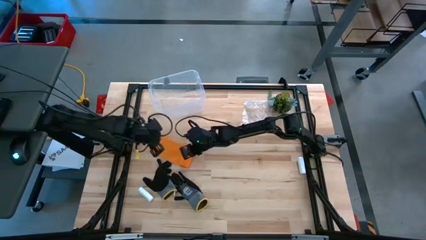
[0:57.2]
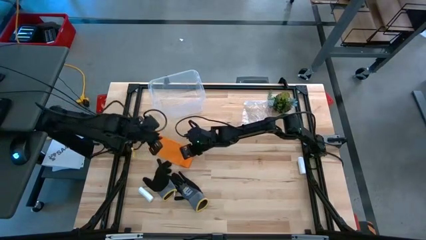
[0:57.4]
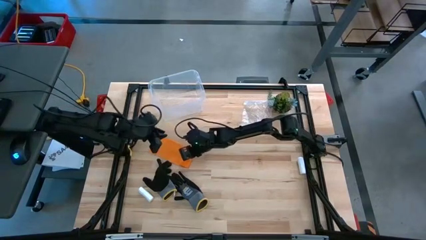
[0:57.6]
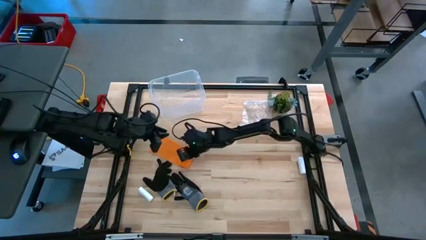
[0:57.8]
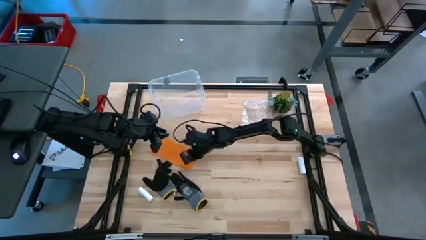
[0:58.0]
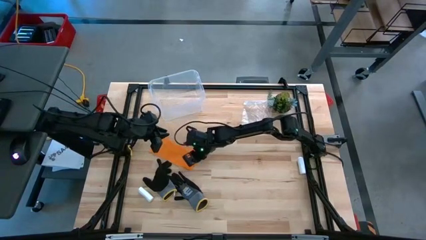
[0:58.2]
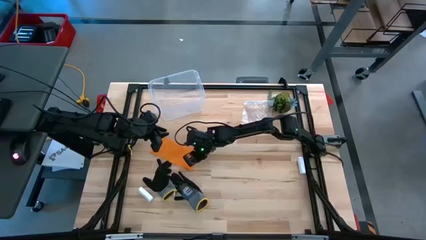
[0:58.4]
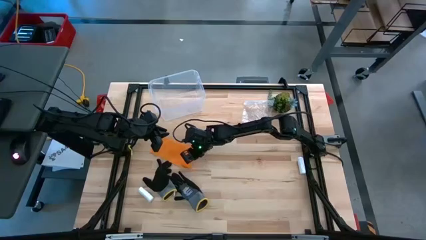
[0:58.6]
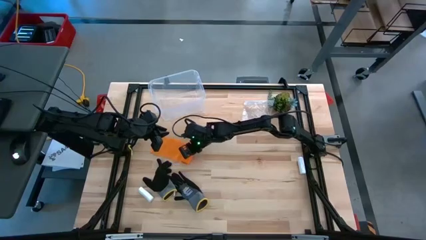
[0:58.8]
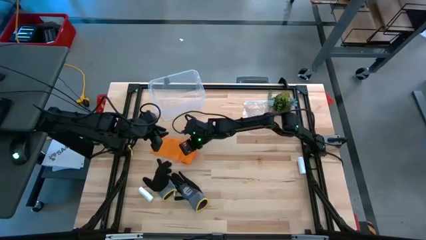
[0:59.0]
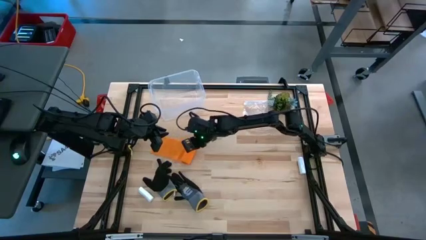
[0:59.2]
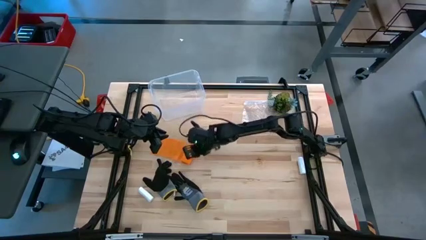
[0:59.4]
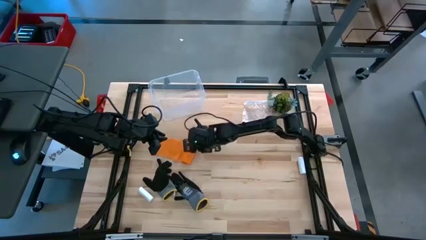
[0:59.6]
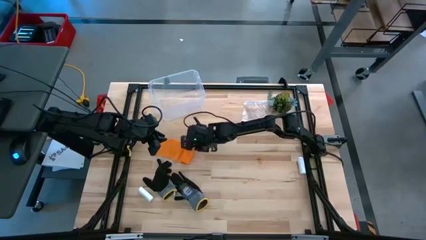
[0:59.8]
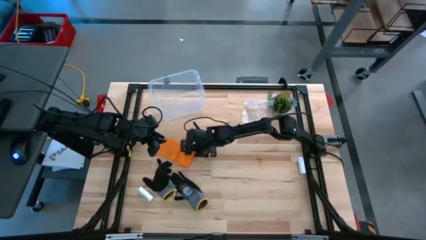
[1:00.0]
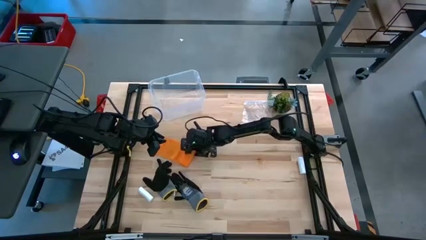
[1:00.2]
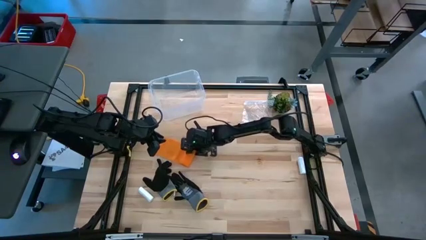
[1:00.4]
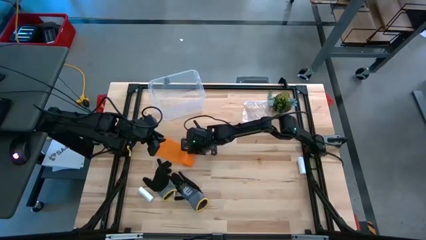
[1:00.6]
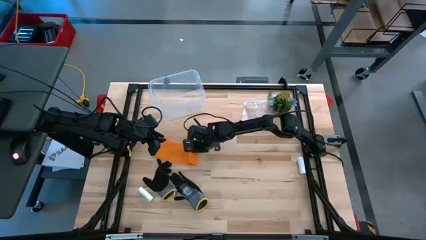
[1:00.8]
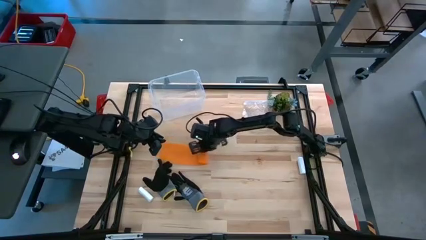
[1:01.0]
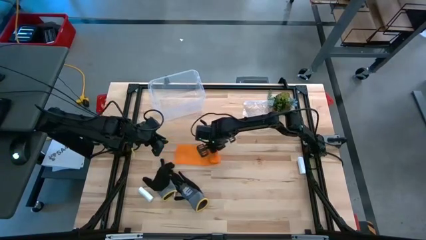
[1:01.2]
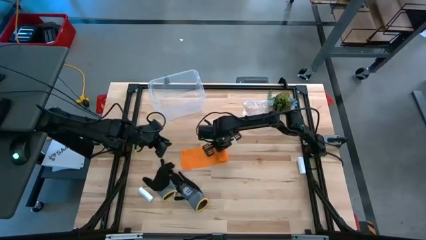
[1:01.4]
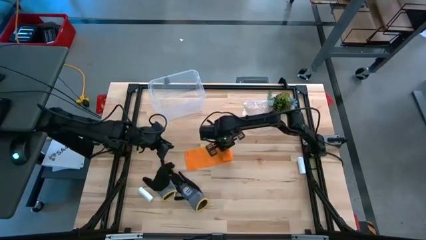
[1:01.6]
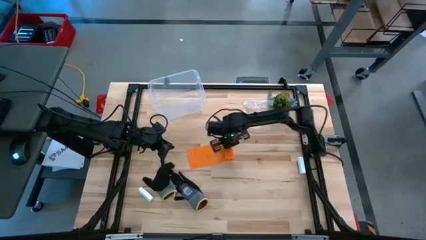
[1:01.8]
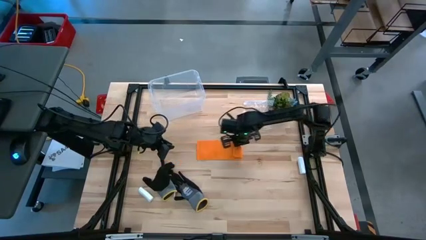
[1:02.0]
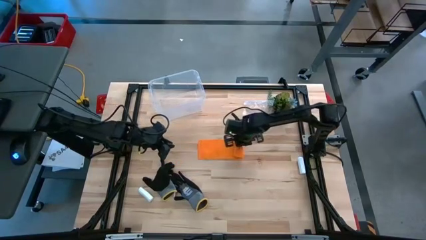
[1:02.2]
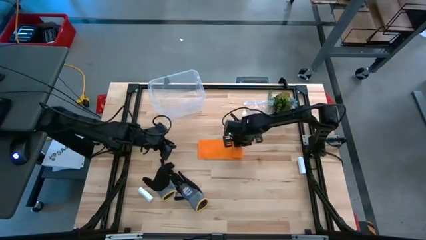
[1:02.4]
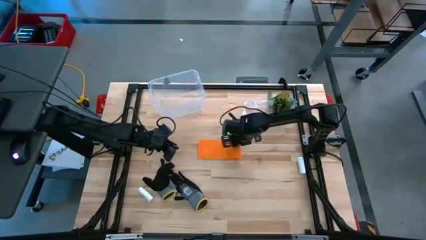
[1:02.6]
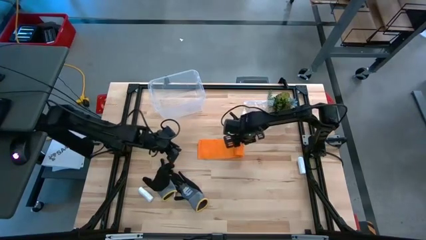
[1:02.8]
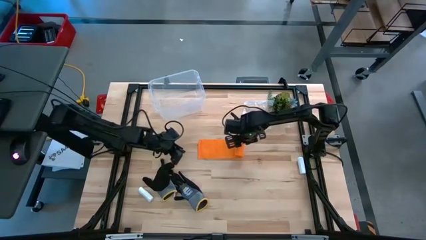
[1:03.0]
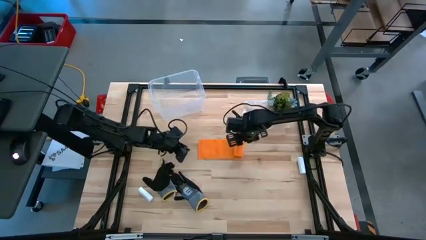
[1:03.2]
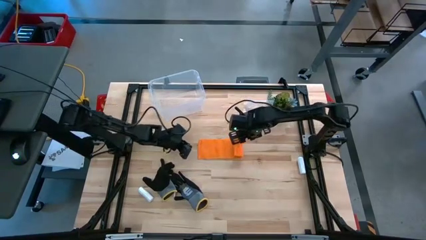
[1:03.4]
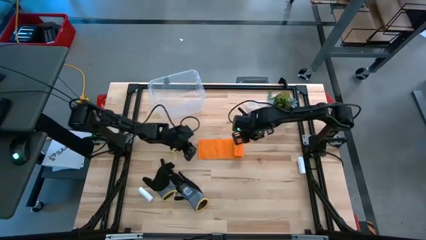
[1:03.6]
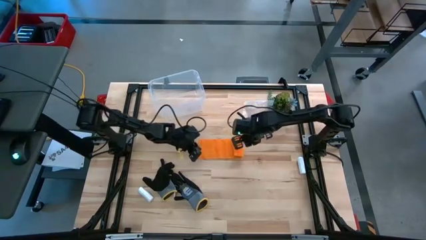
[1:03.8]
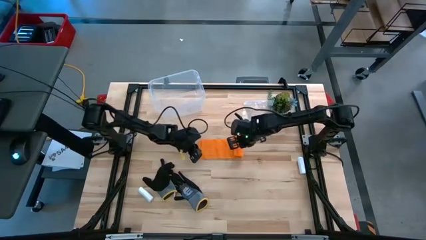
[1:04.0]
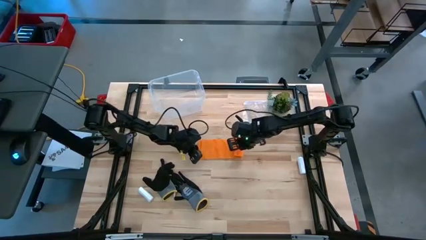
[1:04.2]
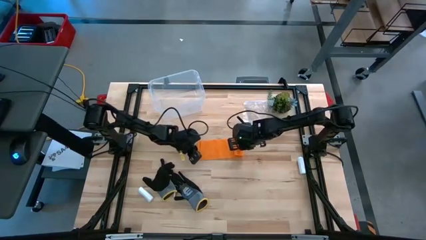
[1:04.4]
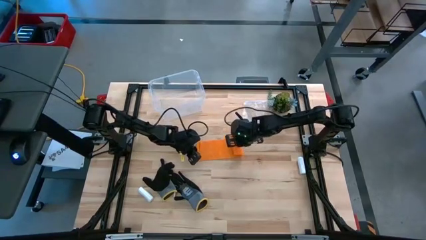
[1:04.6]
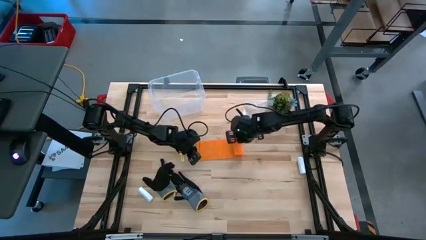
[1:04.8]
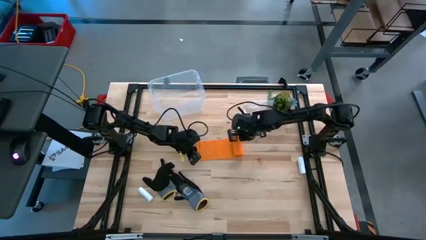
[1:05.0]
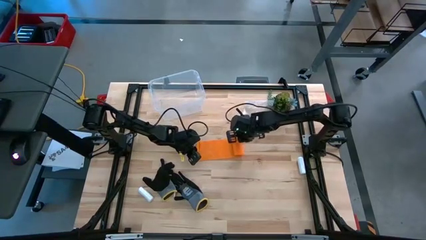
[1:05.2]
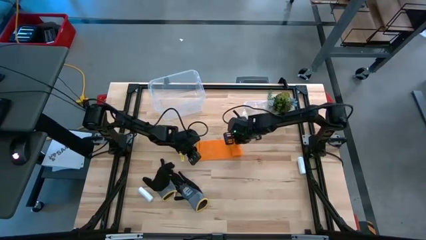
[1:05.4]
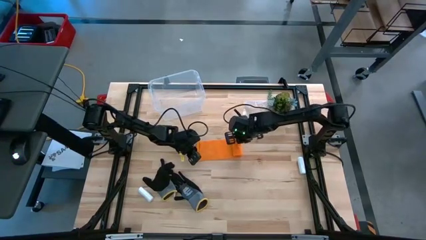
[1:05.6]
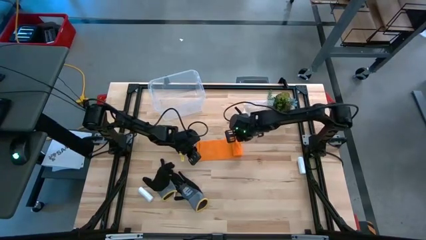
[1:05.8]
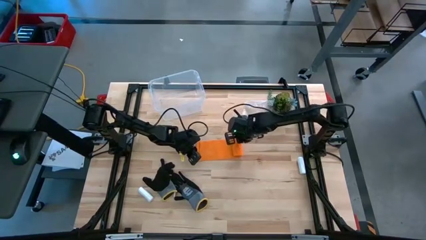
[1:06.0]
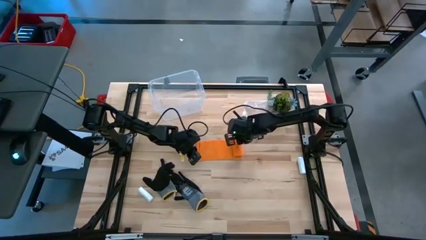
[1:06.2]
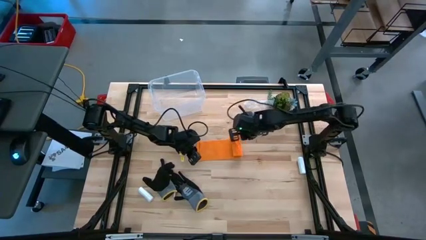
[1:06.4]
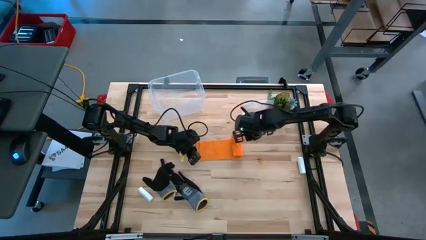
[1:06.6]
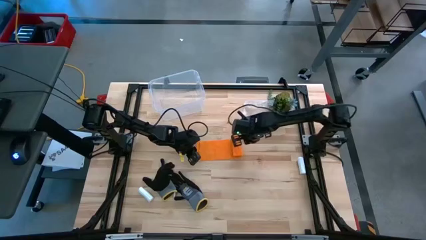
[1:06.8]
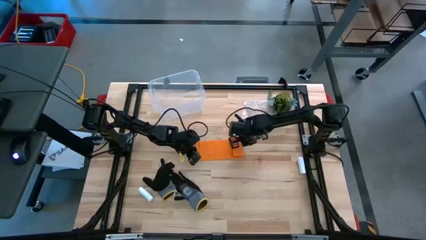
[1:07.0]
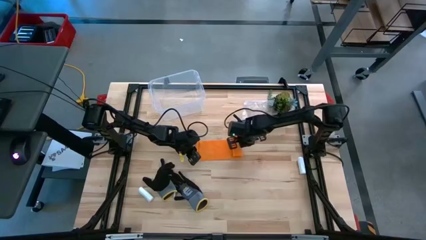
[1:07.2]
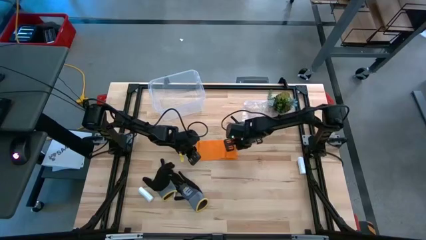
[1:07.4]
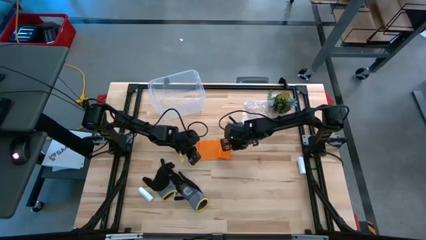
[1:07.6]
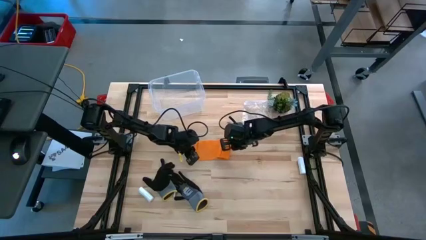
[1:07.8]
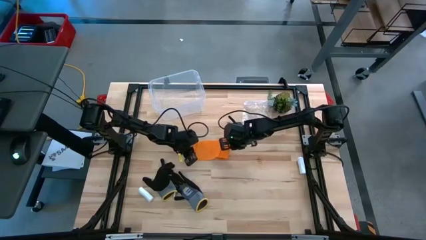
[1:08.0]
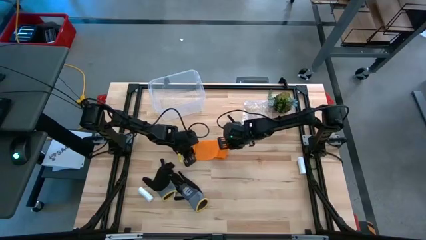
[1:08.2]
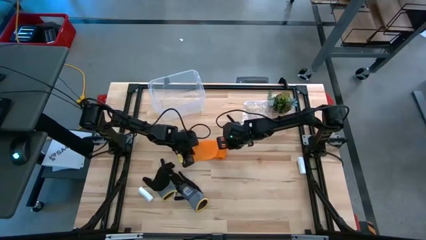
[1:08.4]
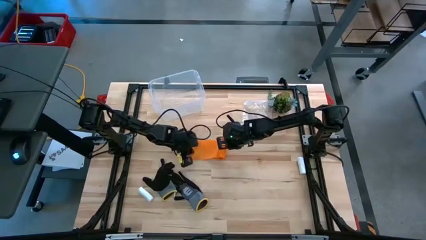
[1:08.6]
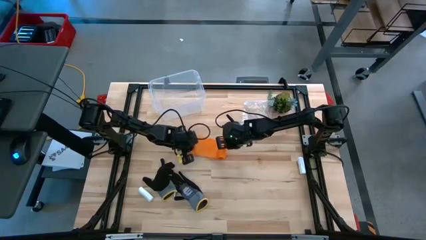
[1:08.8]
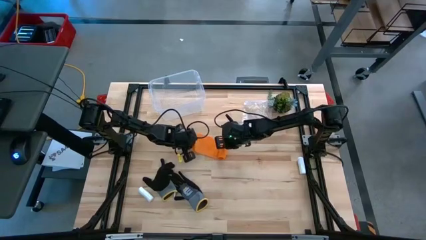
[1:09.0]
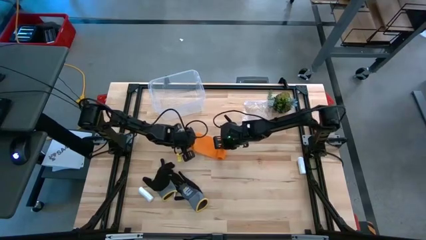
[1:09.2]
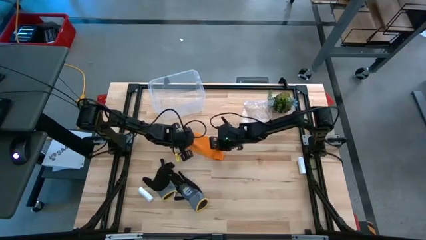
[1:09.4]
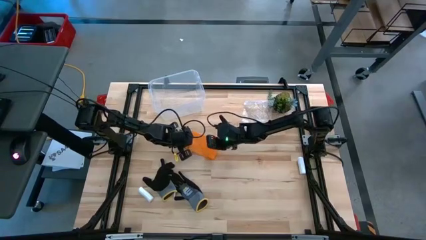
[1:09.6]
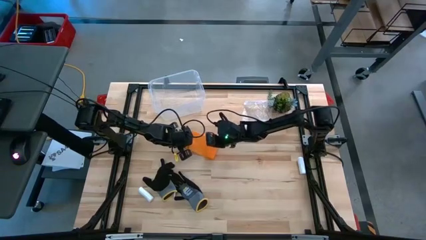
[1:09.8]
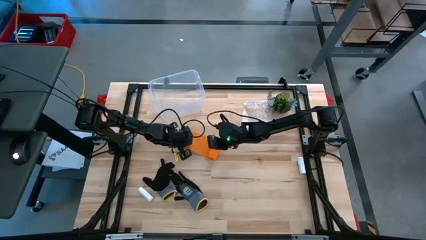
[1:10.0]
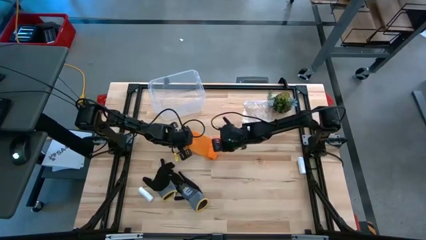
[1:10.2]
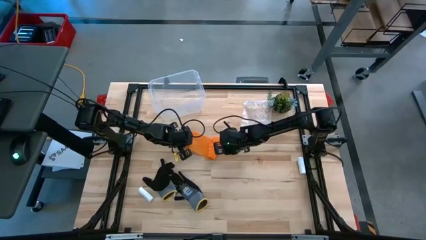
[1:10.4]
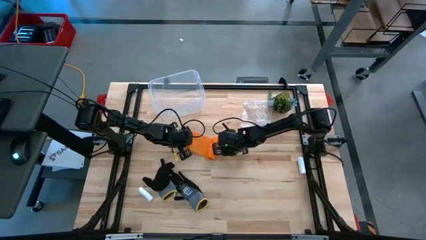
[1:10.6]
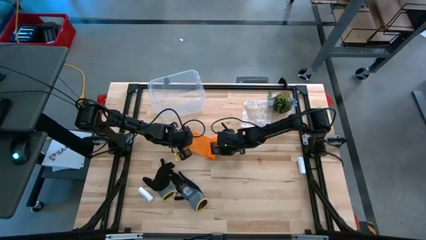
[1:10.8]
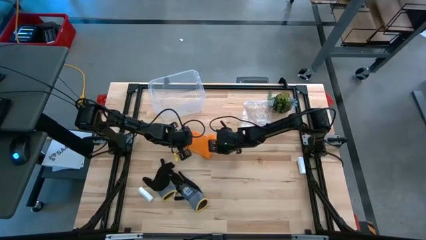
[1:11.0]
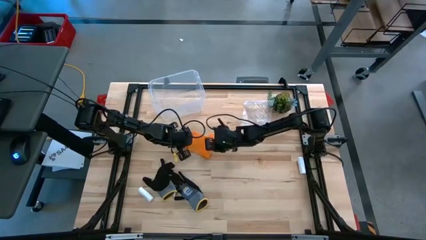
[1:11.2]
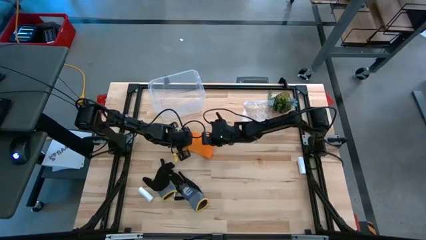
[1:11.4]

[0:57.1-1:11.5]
Task: Roll bandage
Roll the orange bandage

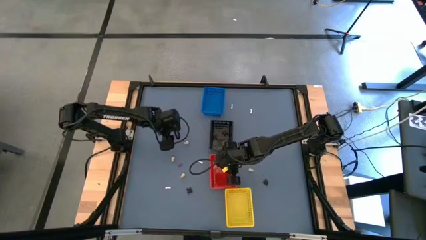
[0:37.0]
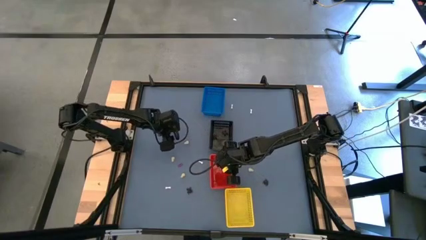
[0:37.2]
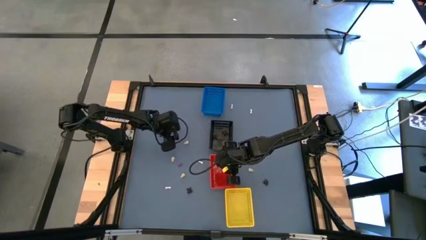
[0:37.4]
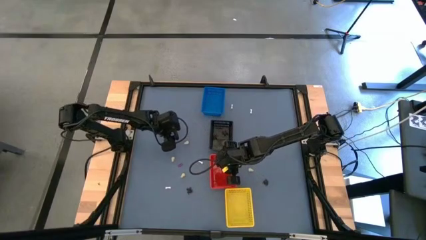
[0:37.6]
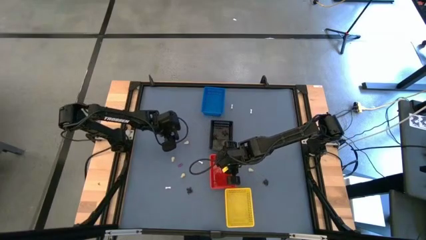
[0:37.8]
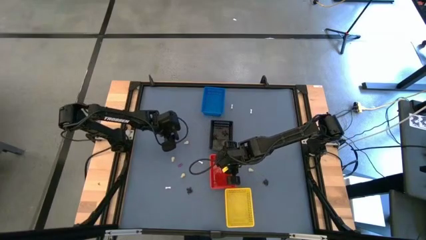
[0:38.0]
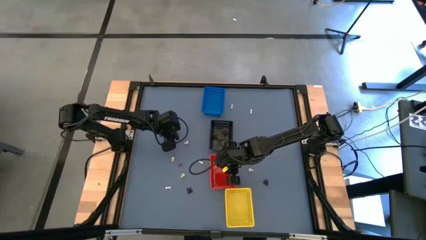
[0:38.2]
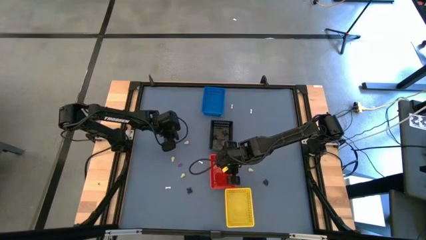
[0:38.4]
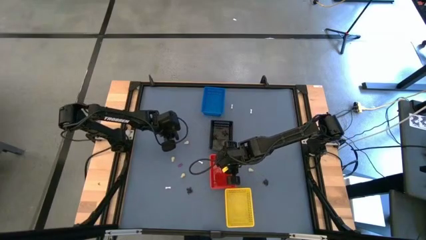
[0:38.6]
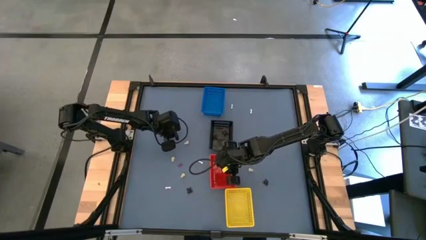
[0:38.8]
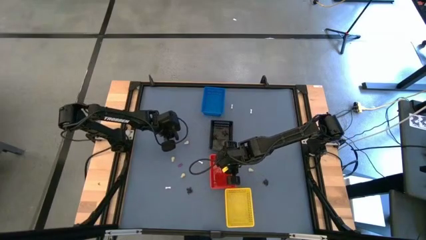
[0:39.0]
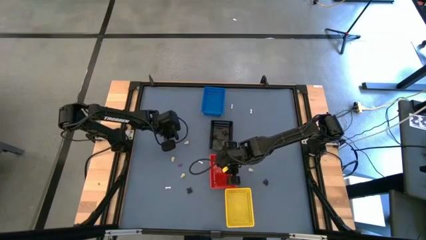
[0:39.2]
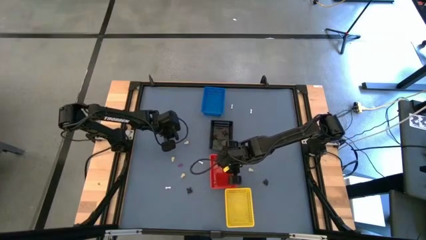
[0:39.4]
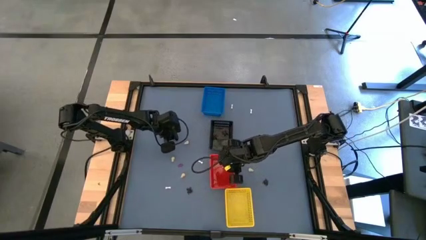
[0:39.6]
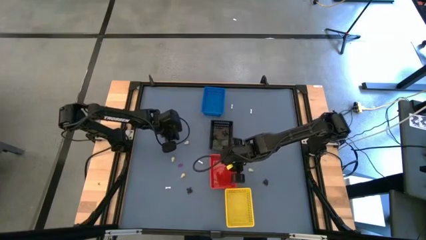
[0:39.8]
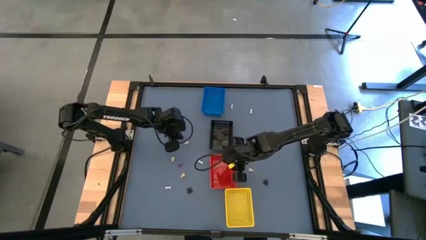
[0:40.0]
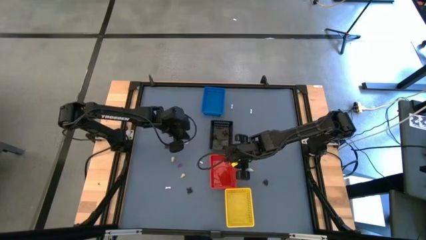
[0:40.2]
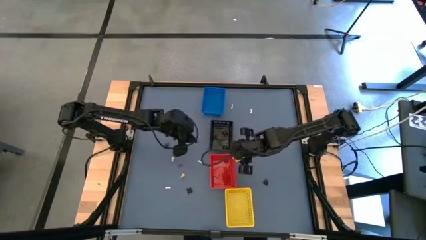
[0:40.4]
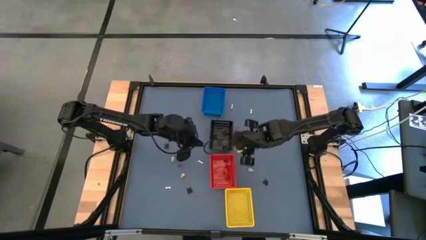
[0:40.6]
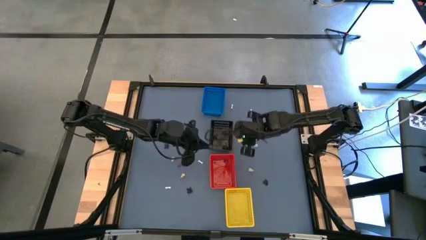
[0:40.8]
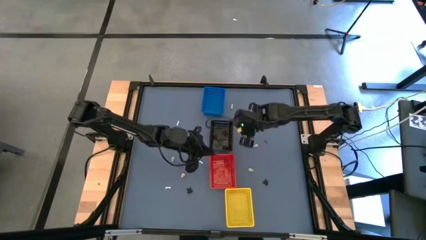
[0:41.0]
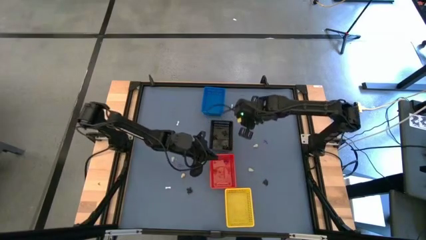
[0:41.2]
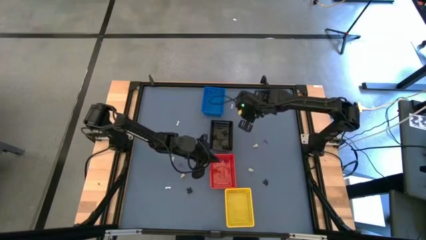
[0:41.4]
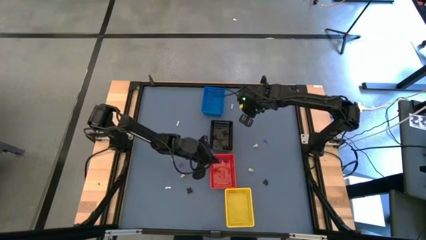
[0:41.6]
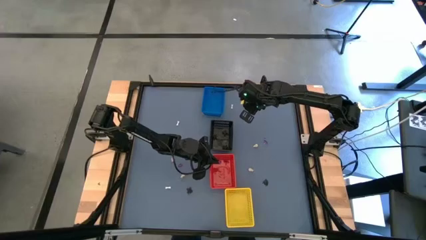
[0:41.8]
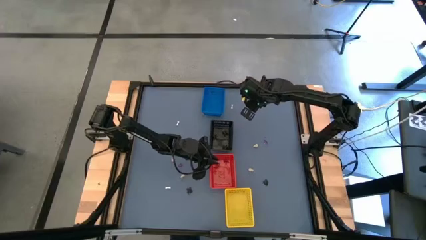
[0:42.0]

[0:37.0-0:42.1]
Task: Sort Halloween decoration
Put the violet witch hat toy into the red bin
